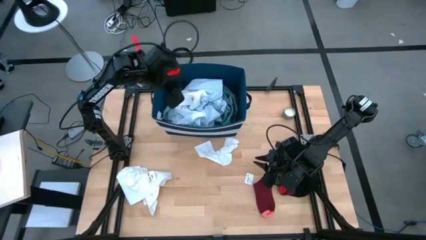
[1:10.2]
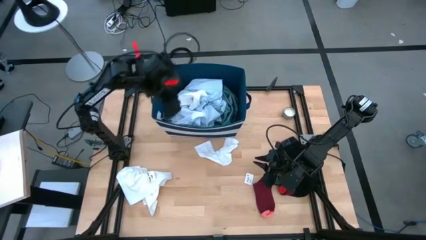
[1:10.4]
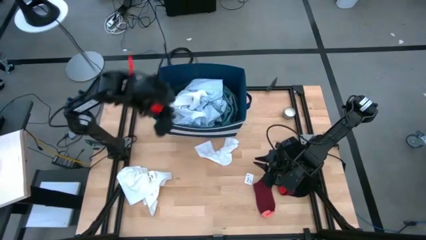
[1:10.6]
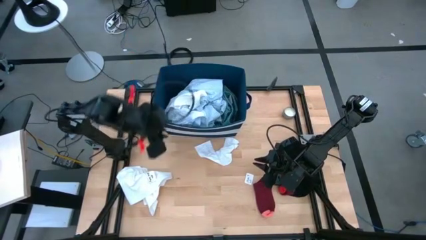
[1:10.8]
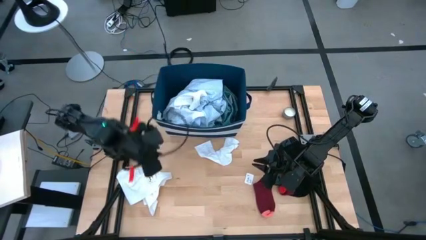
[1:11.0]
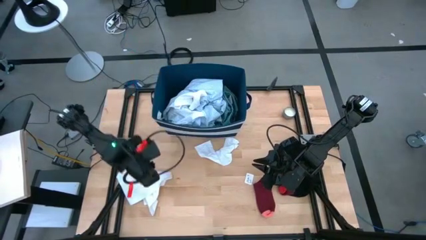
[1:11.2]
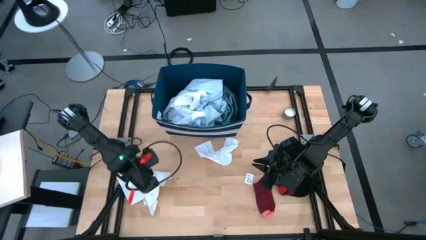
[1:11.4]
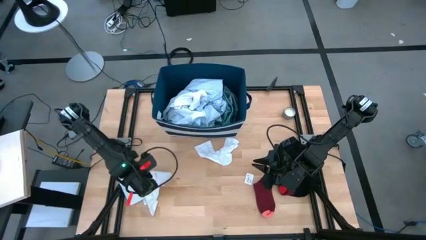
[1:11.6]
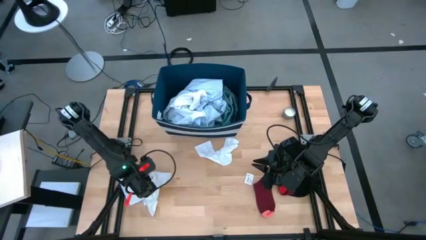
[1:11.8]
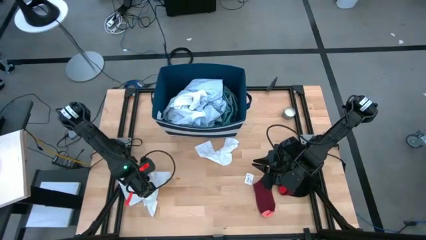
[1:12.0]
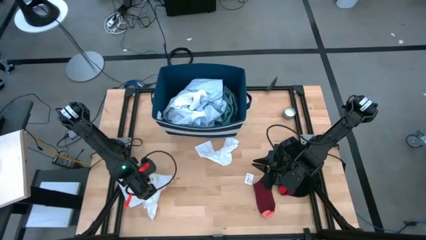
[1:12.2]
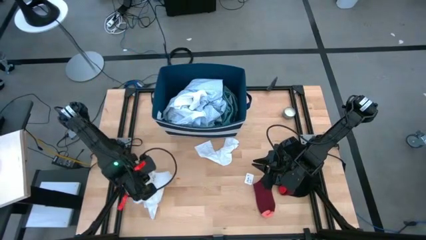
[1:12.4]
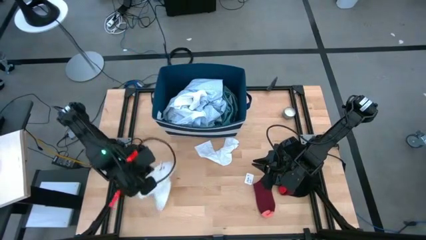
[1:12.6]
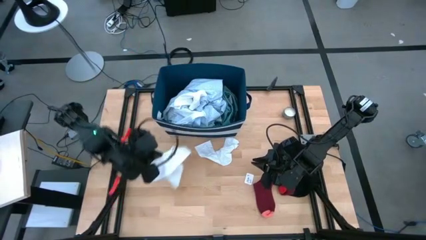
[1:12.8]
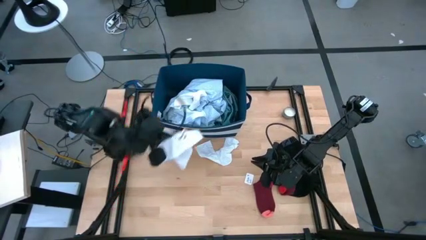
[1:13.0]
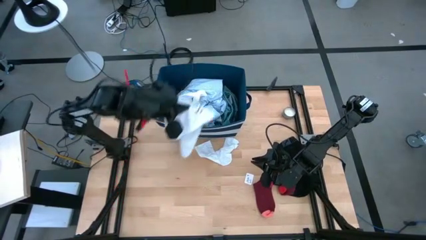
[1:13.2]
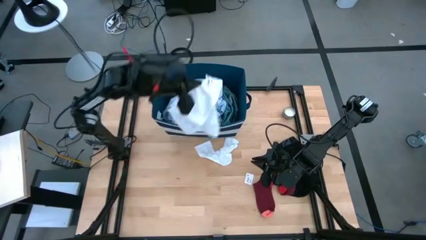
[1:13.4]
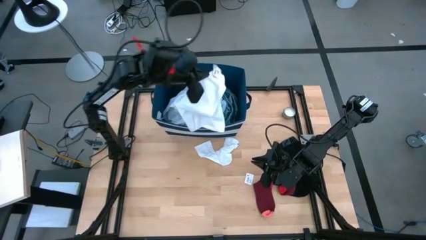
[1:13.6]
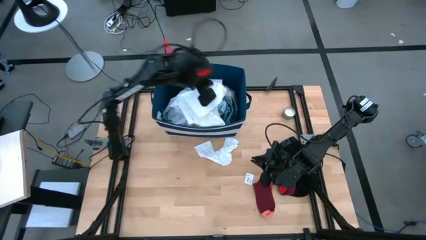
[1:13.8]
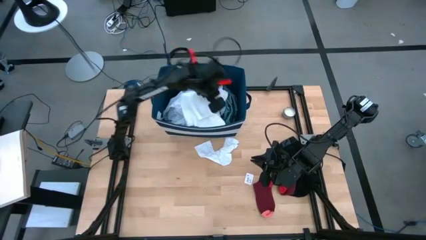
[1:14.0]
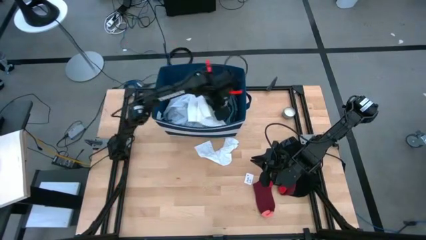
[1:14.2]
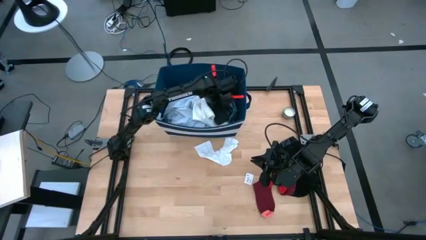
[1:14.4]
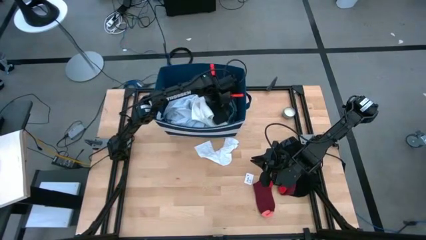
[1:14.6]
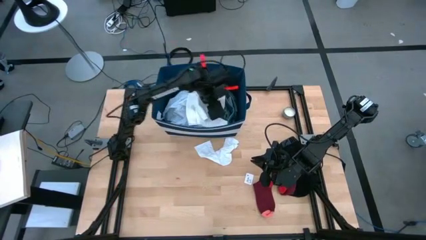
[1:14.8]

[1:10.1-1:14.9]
Task: Sort clothes
Put the white shirt into the bin

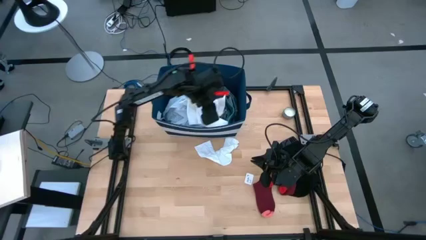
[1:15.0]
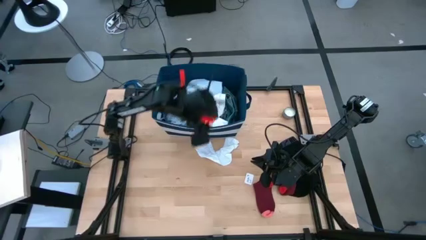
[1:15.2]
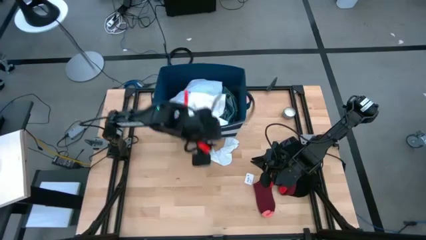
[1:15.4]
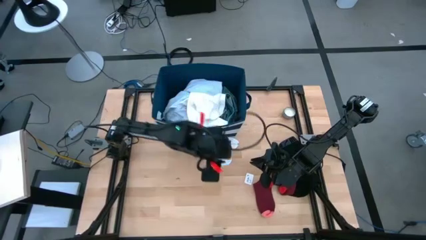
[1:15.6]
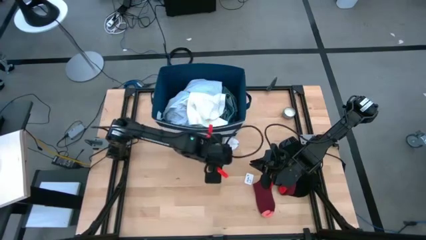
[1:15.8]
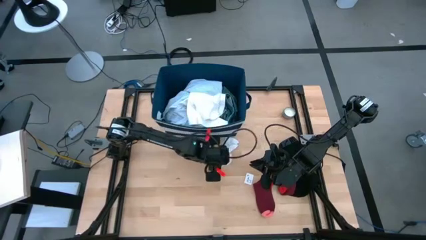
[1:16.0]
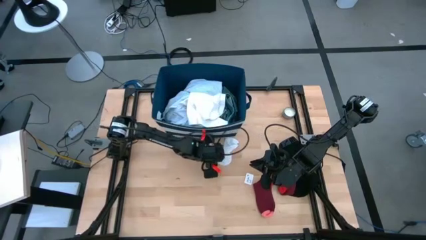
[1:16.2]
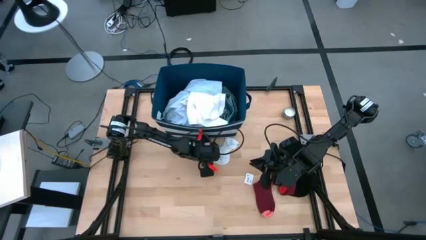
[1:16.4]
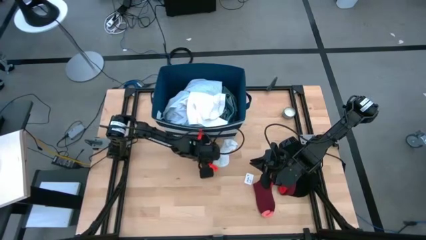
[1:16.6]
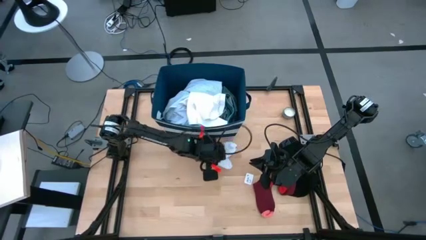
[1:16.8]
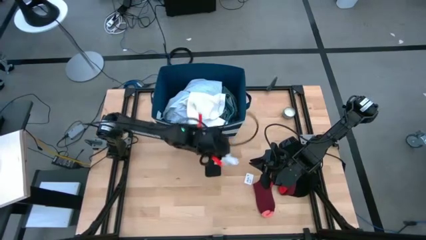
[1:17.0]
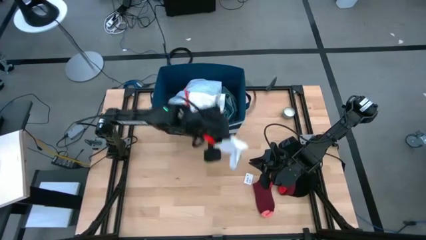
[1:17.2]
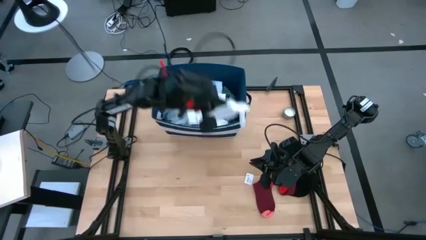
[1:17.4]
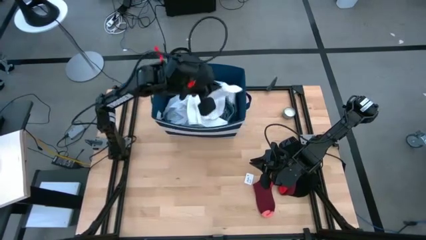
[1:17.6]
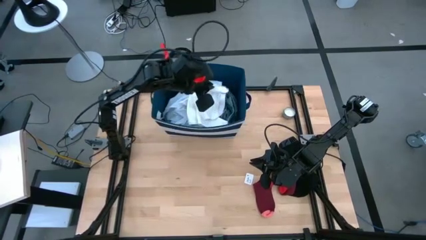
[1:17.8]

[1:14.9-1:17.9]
Put the white sock into the bin

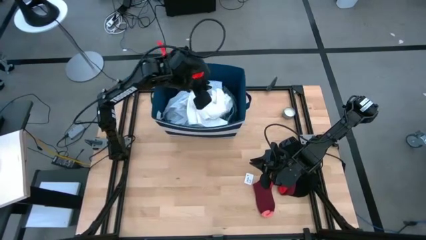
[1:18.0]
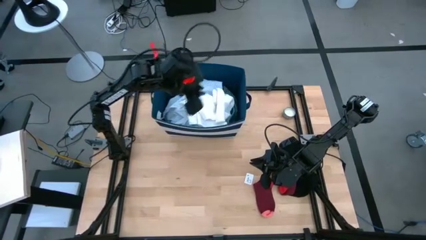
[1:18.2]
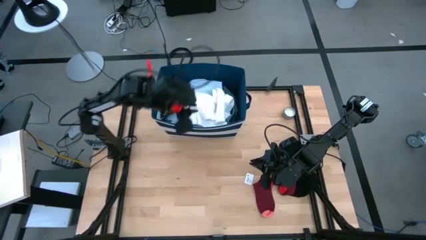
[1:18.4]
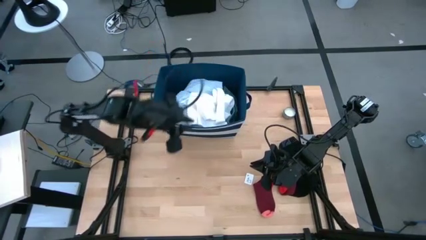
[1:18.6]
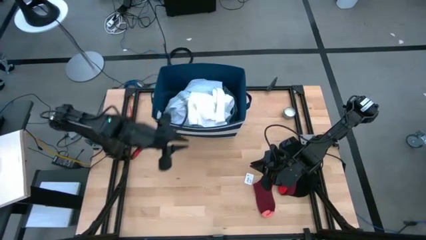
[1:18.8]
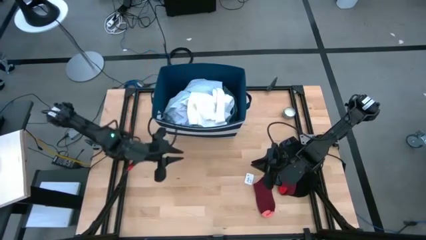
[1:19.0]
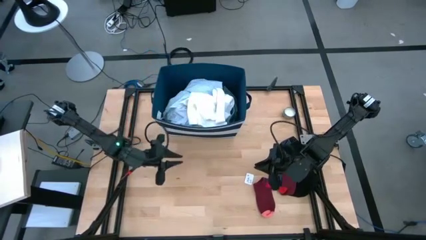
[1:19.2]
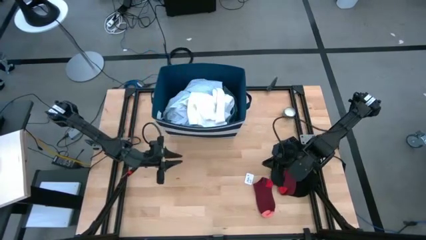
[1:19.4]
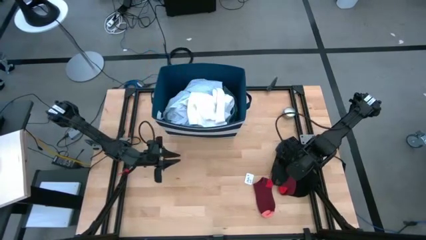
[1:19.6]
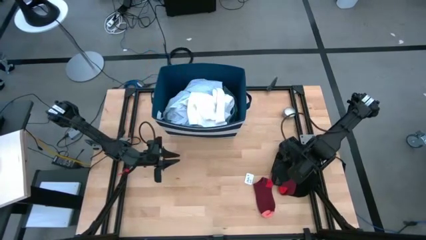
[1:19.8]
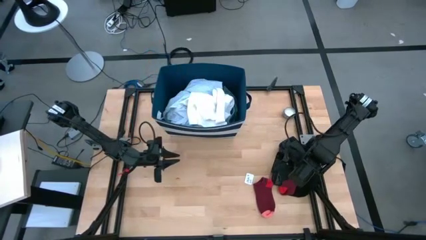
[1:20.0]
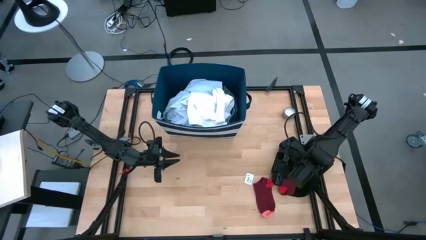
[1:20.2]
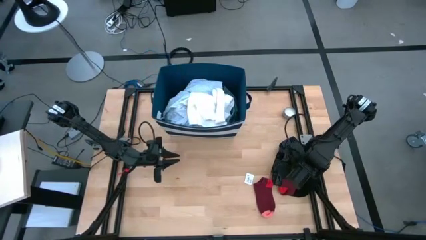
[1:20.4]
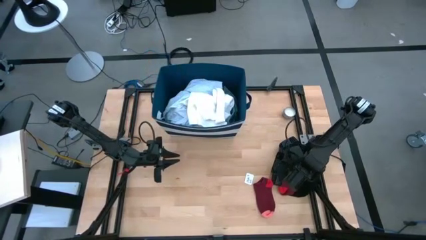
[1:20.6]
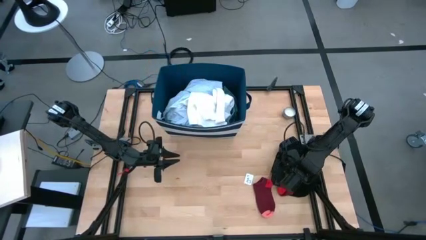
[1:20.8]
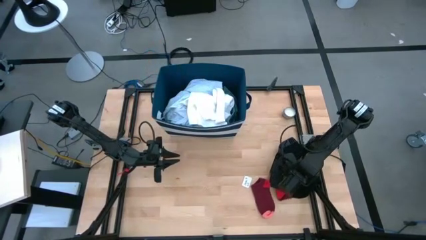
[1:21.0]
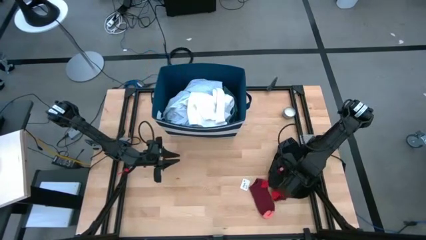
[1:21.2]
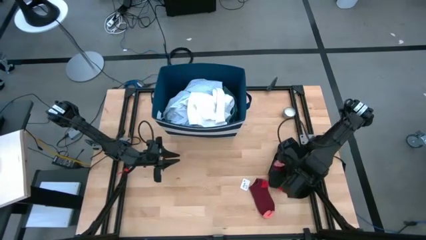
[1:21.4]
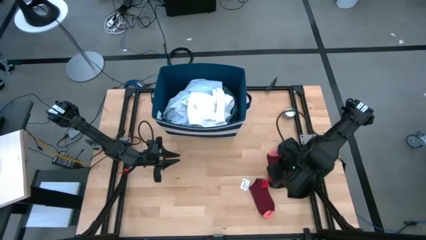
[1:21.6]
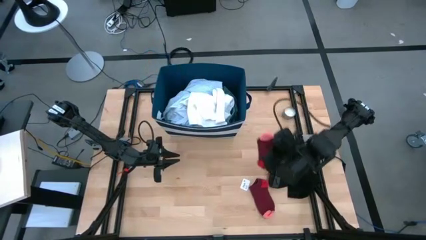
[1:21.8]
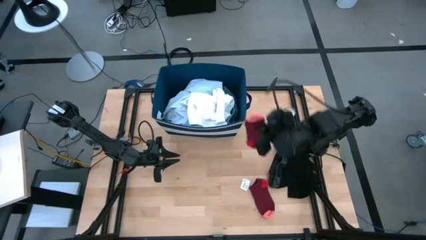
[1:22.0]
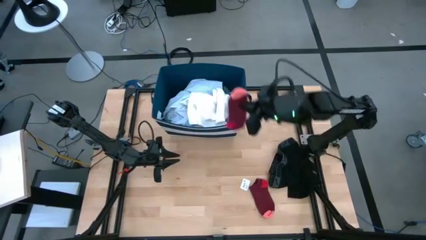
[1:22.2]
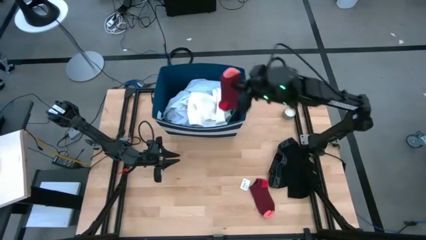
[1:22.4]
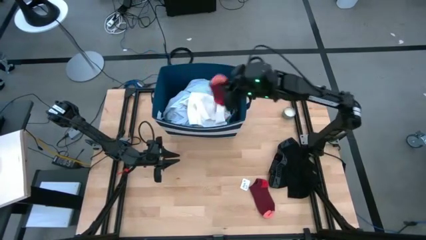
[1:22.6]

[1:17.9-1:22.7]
Put the right red sock into the bin

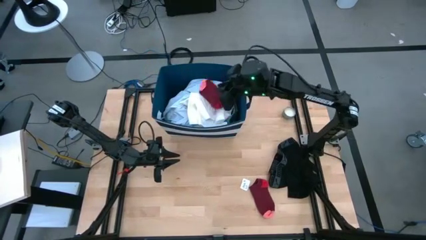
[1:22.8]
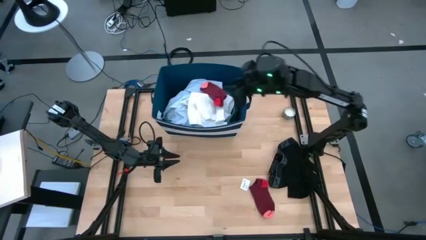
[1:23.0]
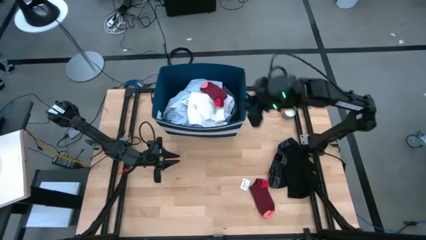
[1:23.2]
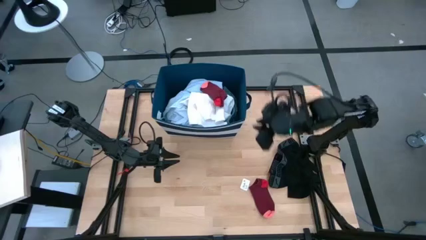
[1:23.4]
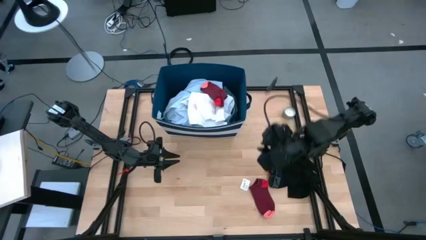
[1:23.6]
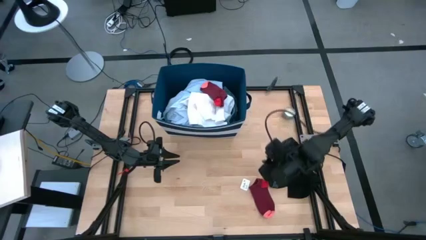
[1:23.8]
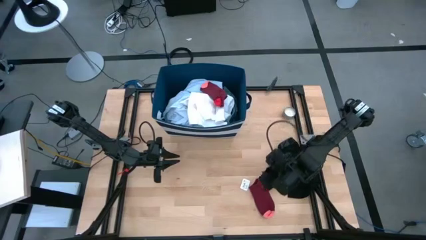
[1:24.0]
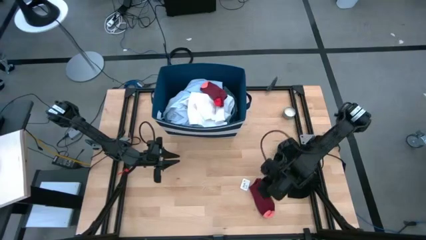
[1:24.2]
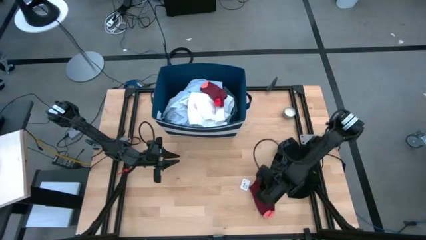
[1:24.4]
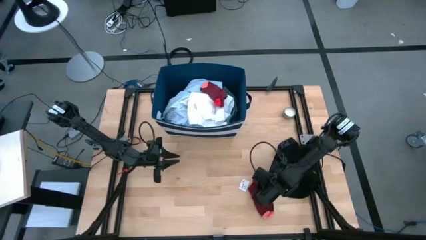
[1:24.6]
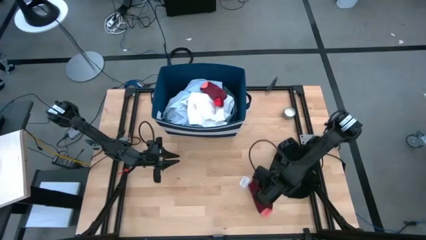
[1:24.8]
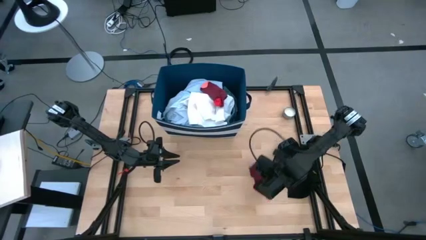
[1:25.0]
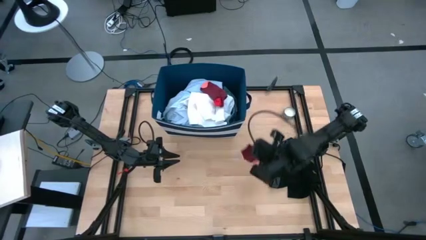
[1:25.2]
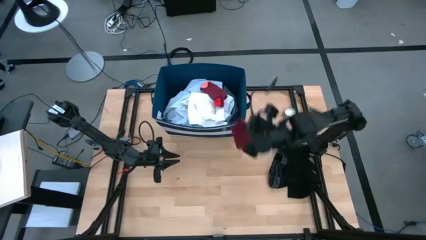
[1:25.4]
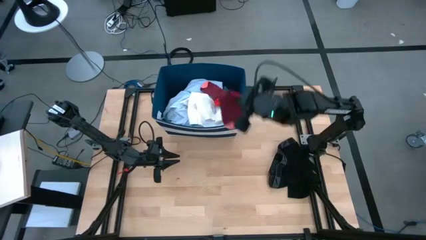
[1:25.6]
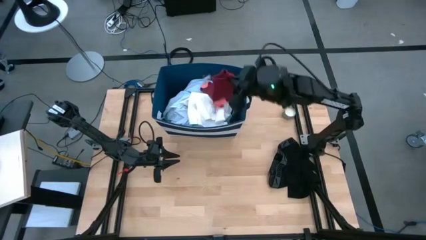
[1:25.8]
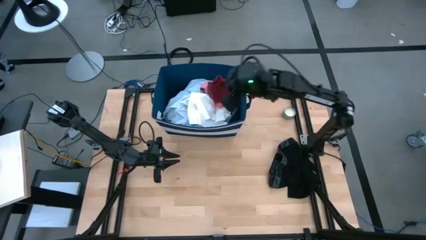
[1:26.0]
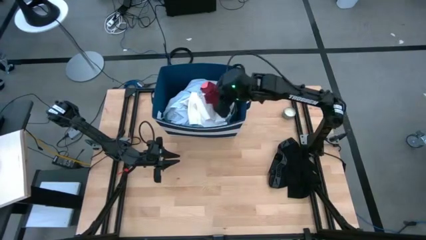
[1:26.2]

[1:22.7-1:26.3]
Put the red sock into the bin
